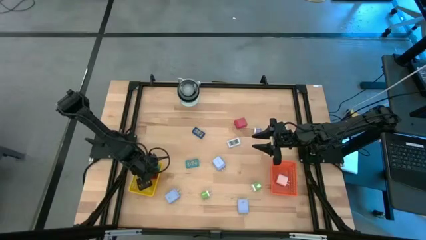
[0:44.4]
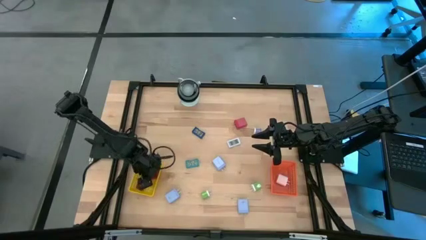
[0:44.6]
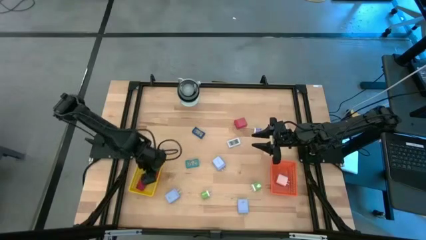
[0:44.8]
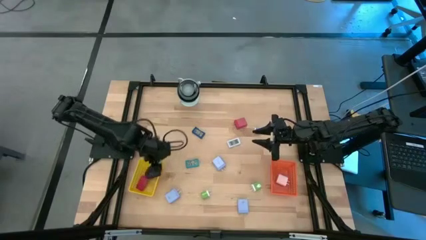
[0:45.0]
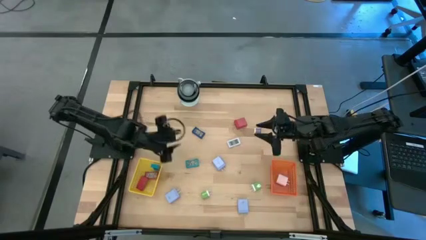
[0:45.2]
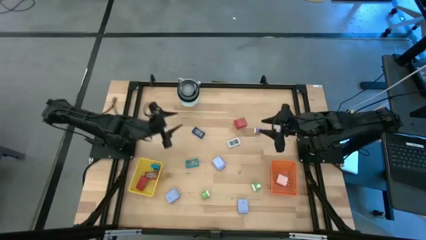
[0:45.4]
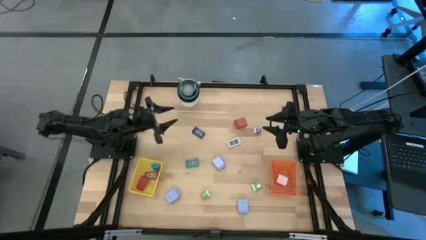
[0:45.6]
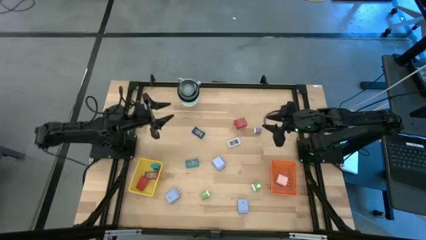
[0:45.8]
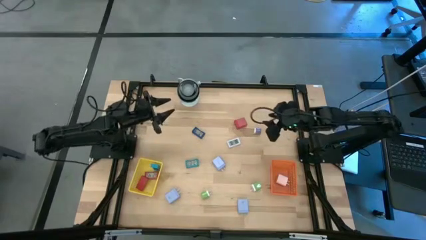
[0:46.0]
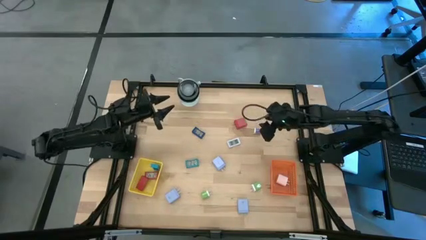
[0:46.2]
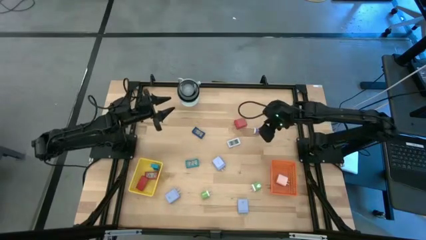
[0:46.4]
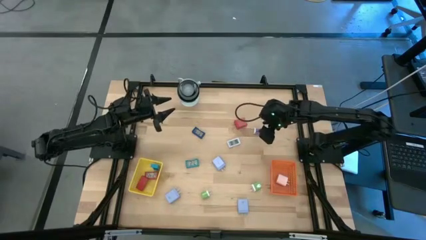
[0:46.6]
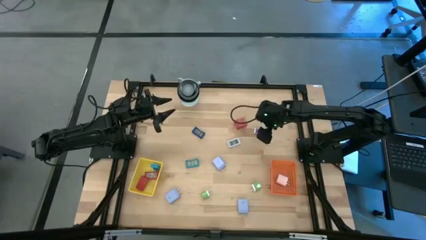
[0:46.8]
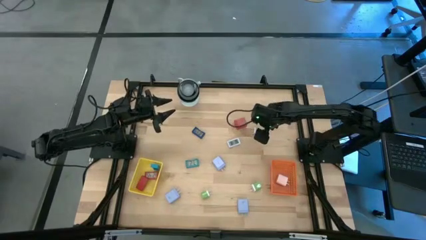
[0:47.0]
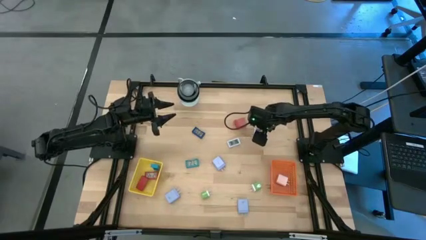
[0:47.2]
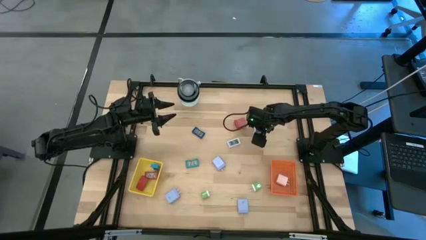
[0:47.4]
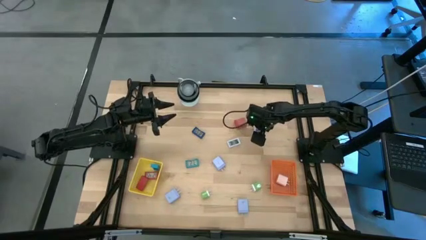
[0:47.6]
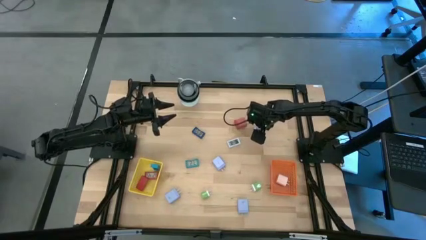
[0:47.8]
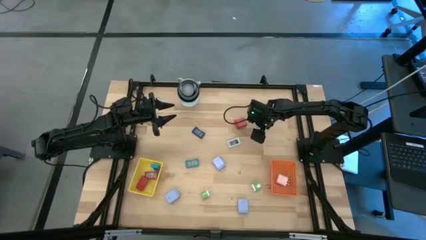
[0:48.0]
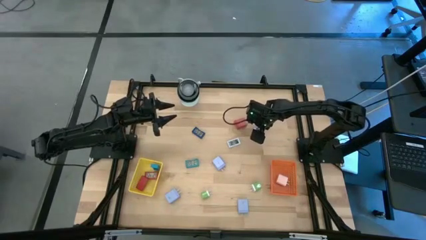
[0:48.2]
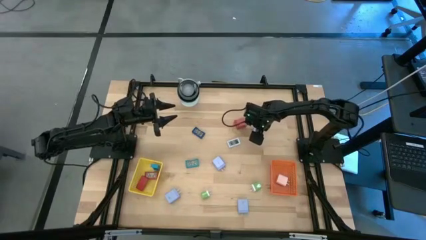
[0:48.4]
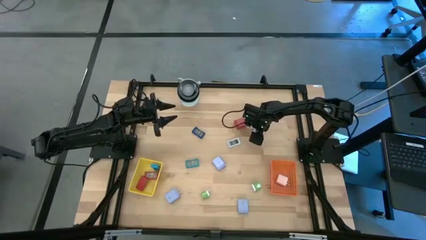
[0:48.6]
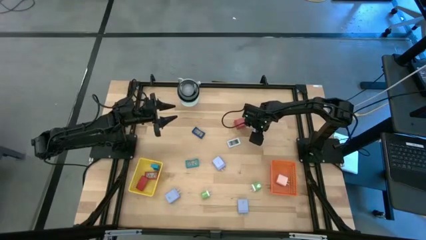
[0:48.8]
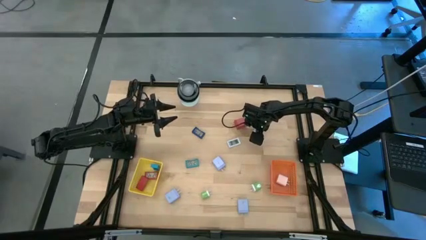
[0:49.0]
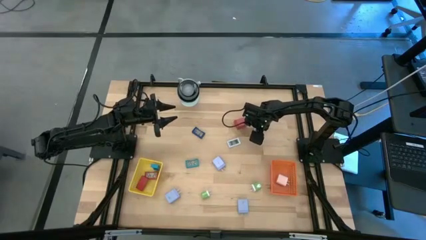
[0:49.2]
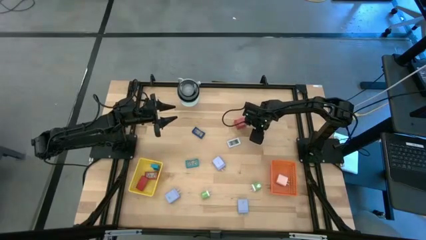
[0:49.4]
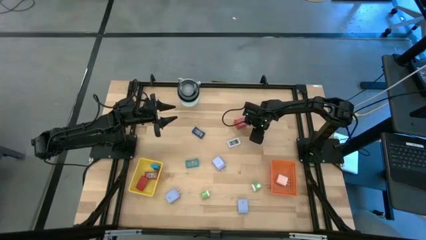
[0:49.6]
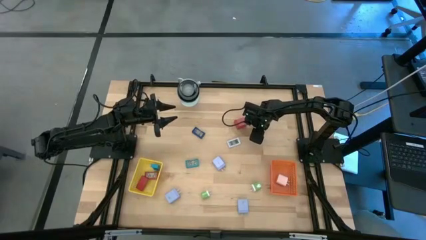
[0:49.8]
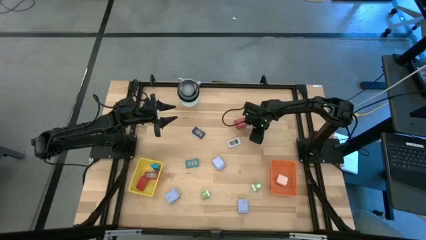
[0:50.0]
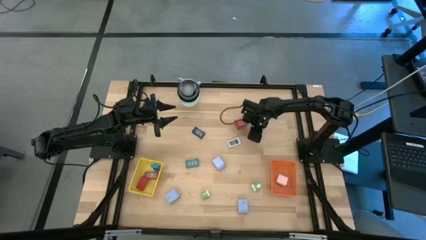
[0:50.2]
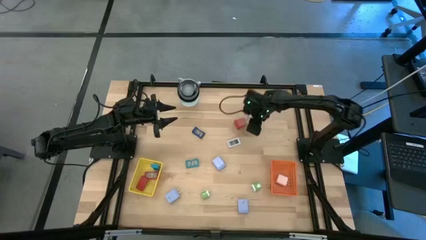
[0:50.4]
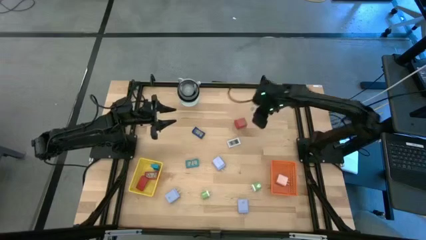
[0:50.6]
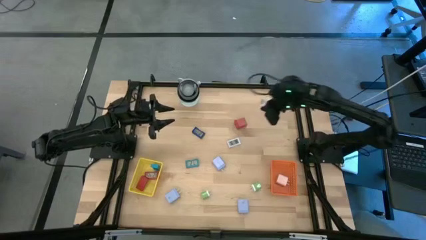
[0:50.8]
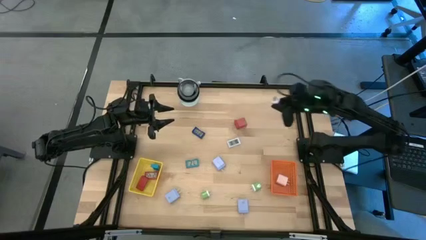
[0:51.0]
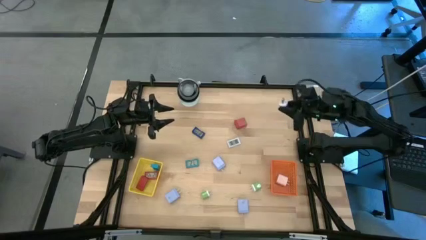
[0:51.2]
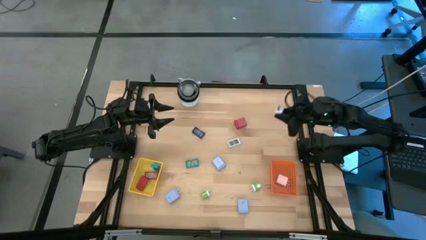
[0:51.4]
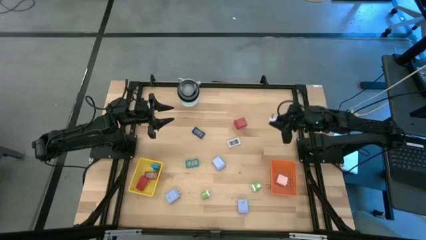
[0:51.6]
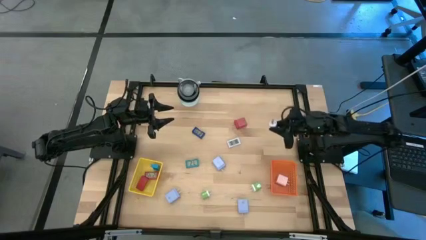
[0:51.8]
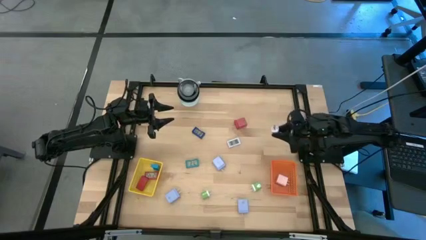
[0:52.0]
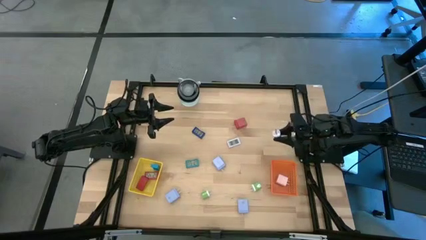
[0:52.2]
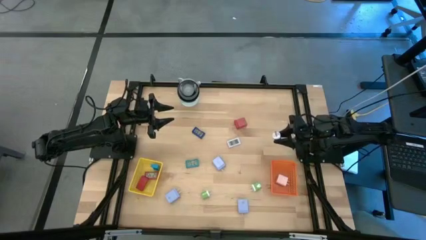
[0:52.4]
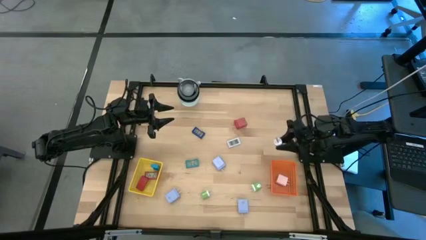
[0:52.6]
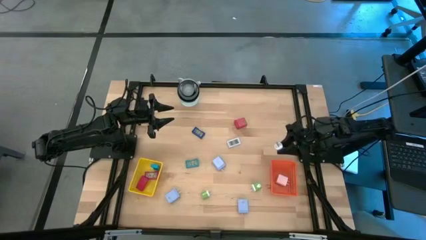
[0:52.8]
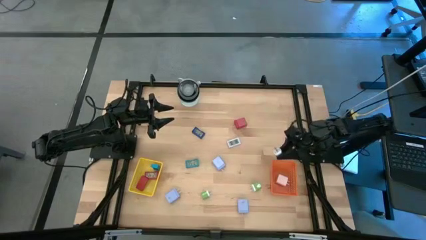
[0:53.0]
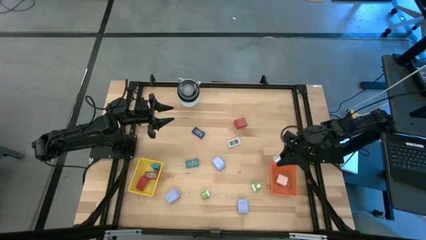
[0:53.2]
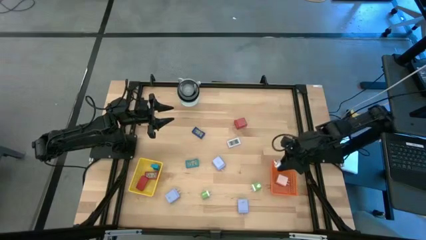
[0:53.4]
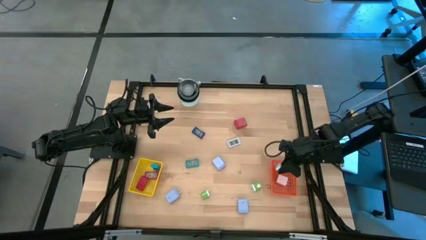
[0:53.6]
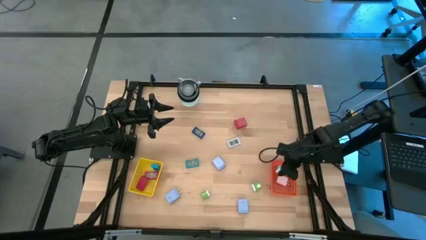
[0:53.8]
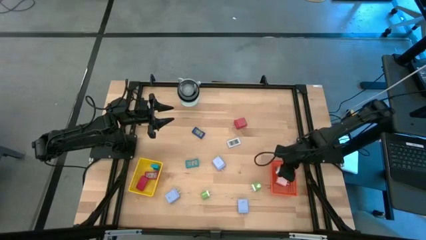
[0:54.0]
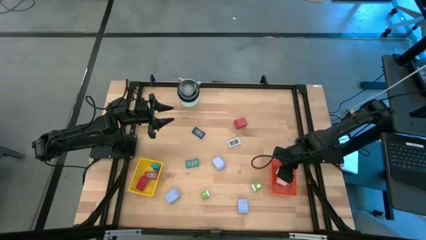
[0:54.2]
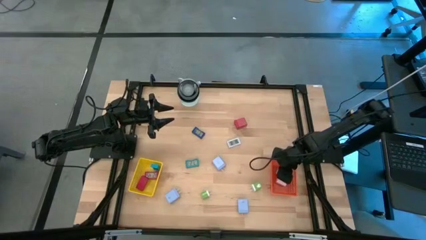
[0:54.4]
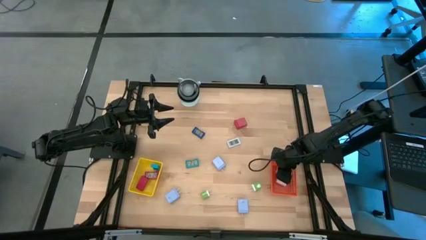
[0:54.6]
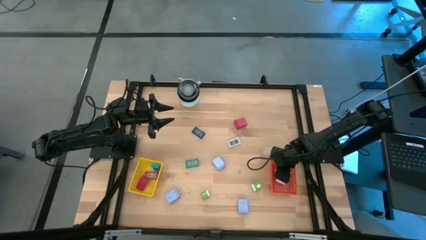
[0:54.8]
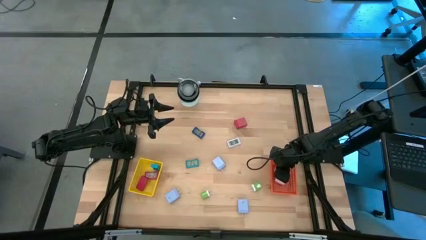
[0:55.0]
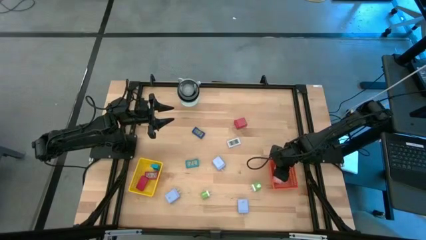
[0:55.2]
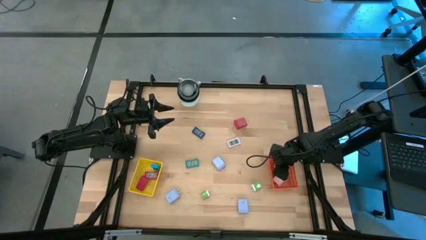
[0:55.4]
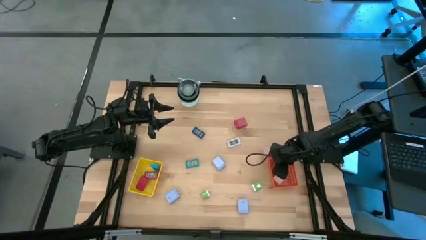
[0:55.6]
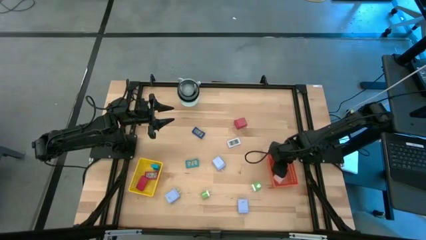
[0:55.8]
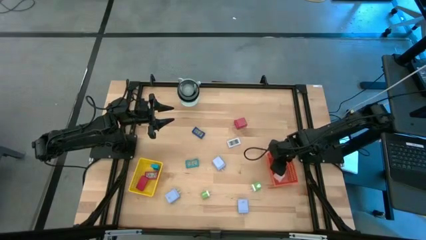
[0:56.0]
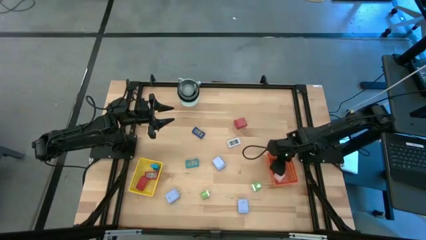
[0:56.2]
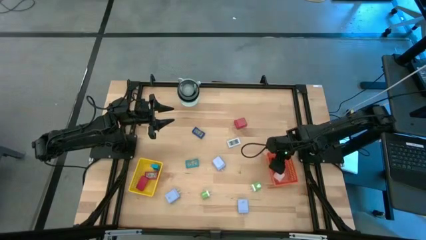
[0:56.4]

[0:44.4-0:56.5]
Task: Pick & Place Office items
Put the blue charger adapter into the orange basket

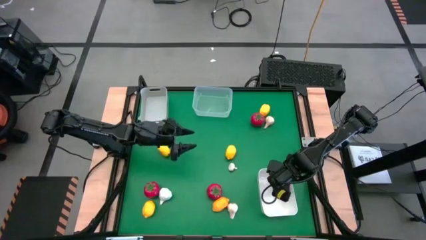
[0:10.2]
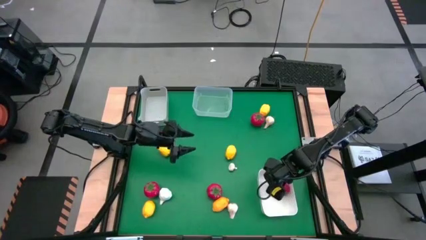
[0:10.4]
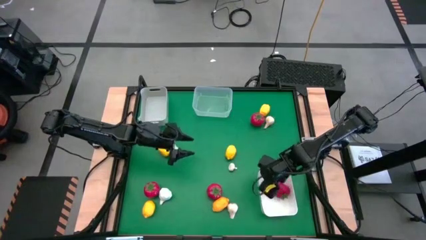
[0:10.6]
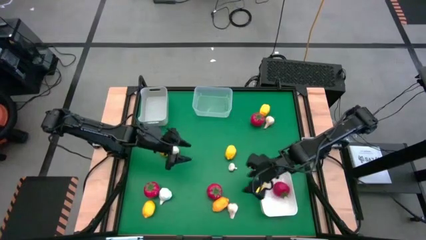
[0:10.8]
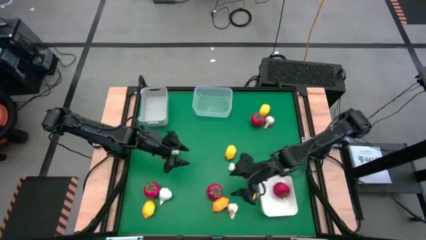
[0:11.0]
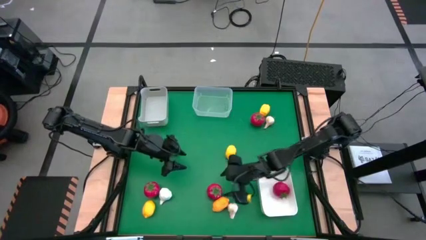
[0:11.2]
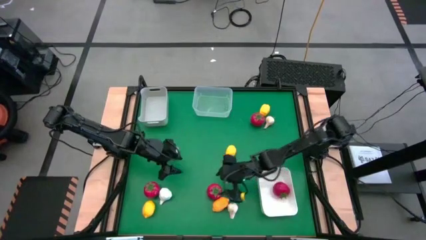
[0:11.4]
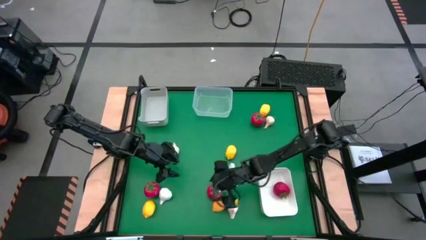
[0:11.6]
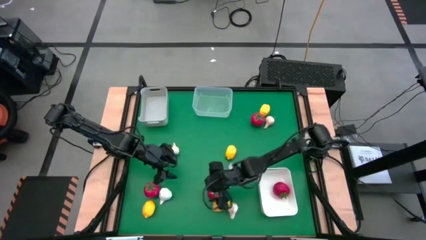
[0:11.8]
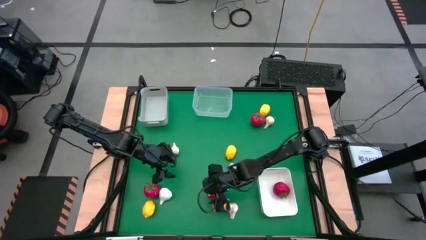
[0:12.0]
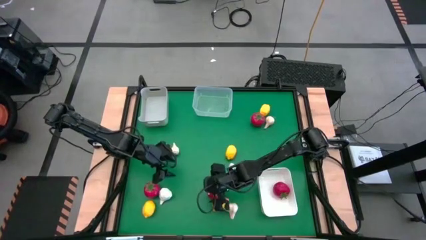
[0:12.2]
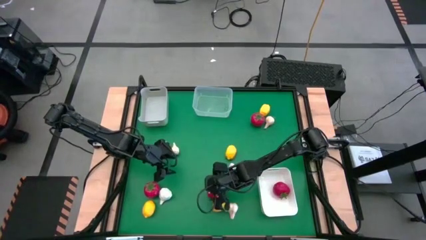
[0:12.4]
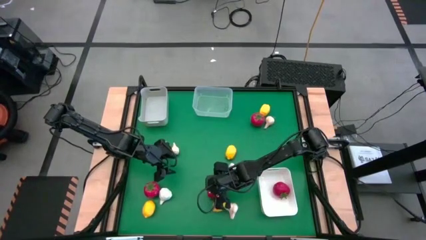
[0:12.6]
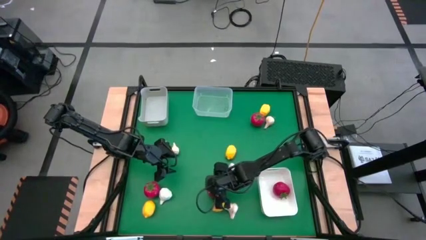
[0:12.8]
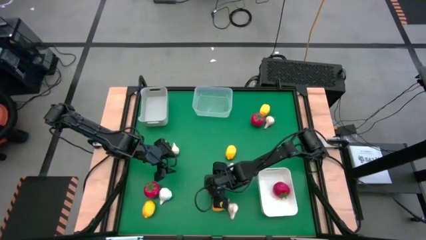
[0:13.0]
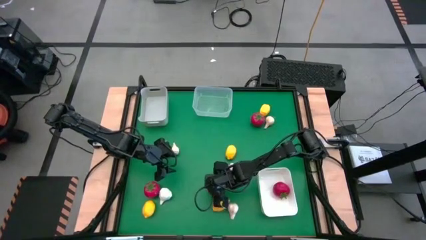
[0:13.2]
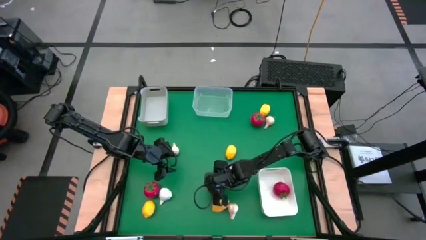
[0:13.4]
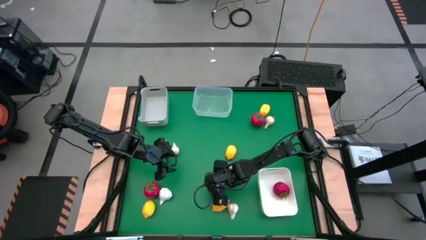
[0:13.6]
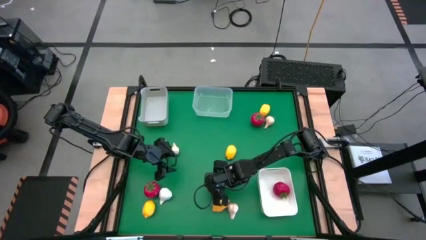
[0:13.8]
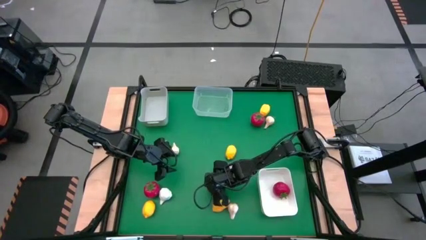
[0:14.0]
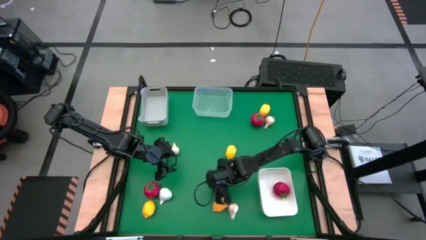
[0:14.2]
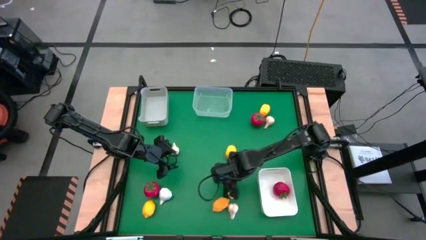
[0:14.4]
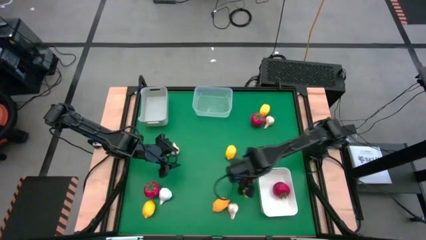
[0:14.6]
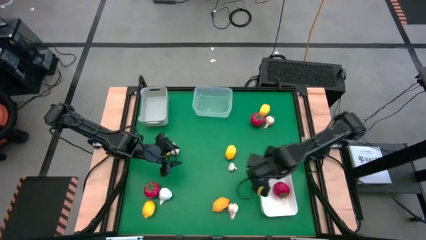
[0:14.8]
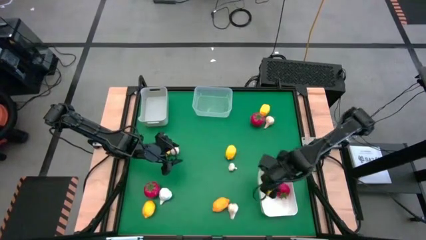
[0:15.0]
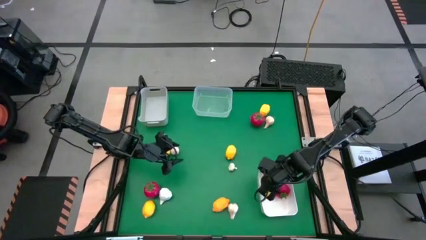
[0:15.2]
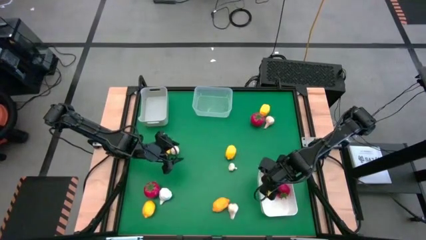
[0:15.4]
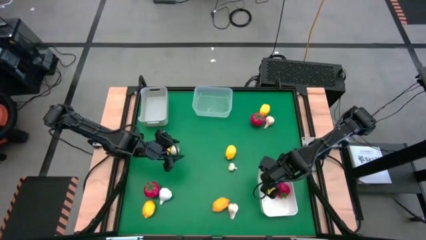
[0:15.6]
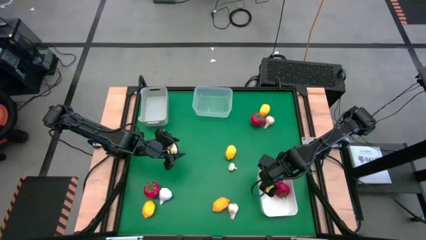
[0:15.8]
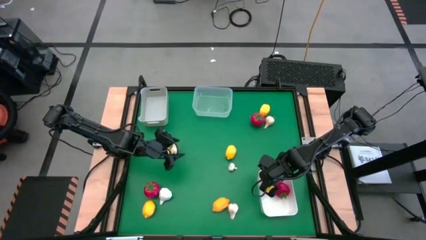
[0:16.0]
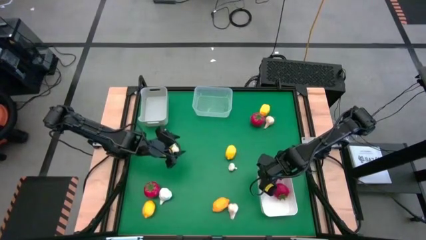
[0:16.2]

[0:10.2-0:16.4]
Task: Sort produce into baskets
Put the red tomato into the white bin
